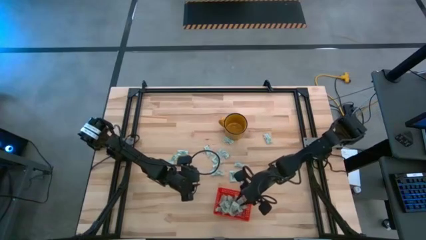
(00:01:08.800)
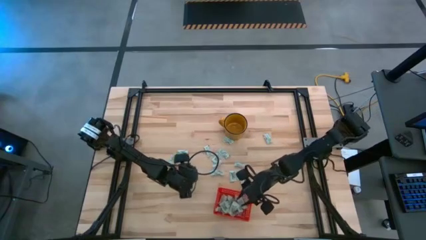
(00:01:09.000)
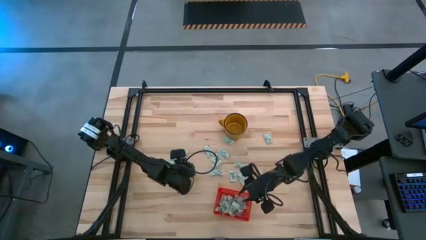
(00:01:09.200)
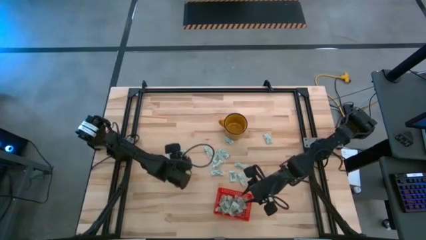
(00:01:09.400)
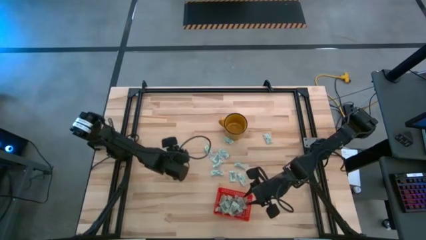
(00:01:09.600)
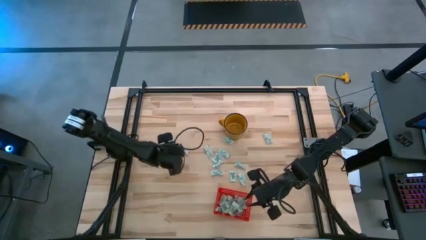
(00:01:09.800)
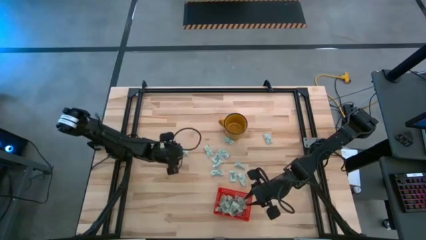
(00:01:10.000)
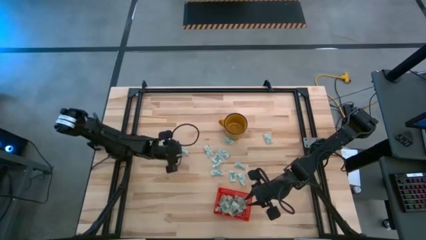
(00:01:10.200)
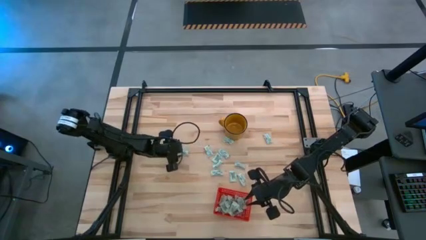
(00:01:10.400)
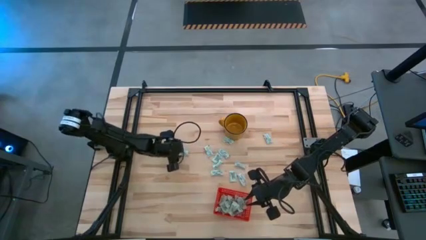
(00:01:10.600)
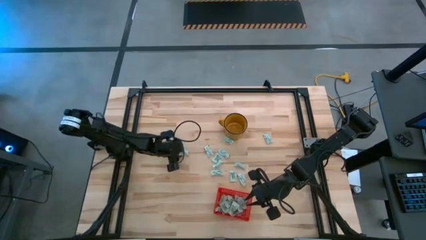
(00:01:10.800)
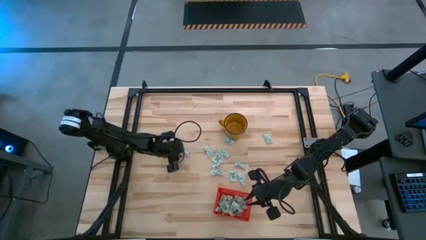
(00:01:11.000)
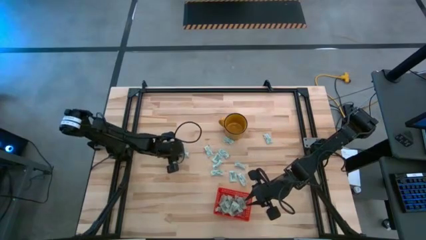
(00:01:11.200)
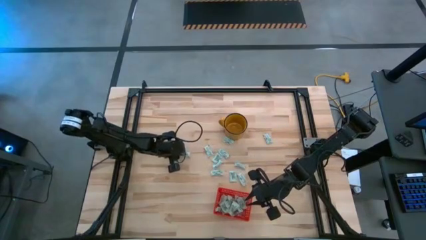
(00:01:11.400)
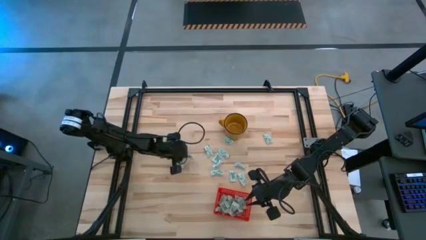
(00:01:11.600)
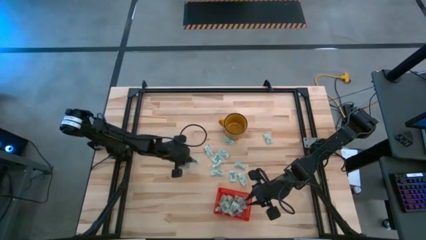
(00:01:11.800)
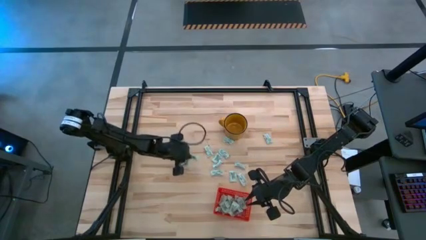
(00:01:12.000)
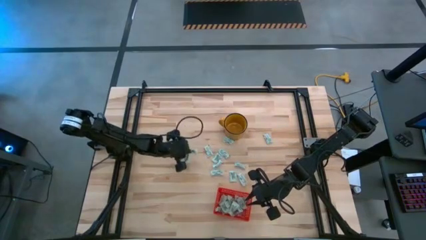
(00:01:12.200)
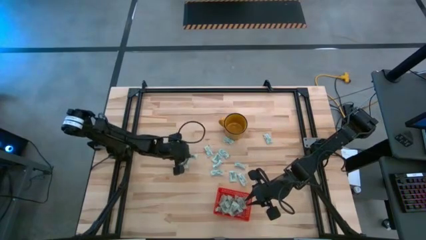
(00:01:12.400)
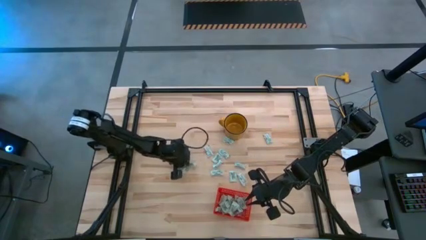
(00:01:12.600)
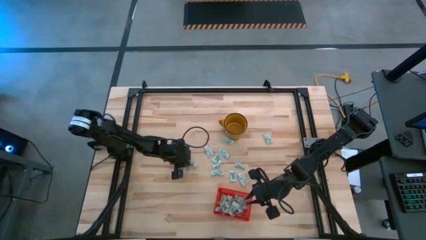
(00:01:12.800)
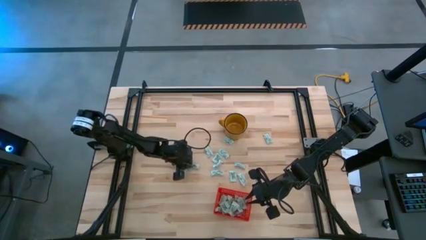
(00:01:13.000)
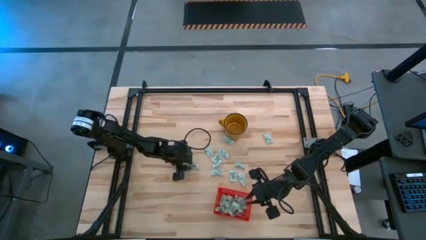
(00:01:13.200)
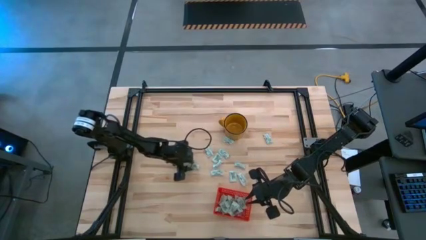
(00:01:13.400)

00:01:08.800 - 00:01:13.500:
Task: Pick and place Stevia / Truvia into bins
Put the stevia packet into the bin

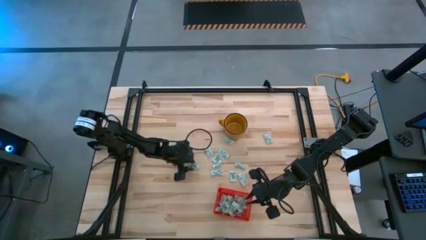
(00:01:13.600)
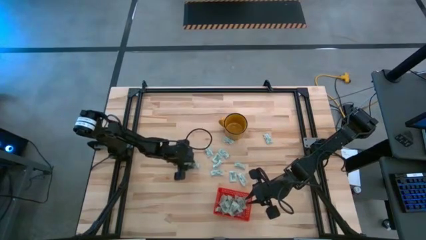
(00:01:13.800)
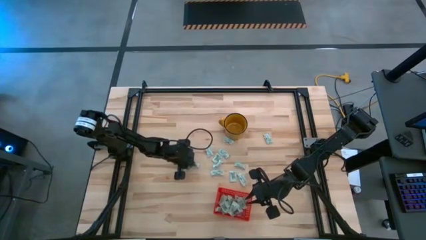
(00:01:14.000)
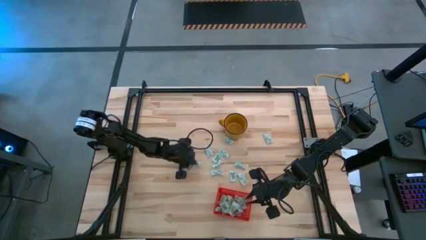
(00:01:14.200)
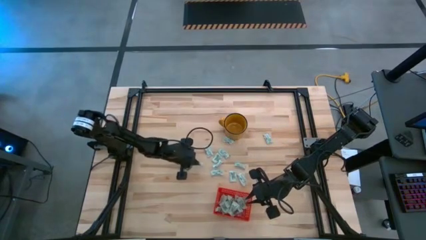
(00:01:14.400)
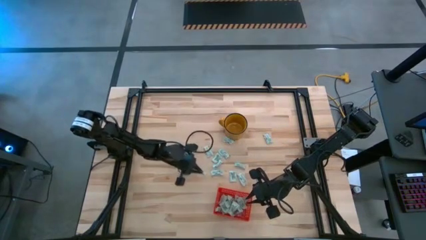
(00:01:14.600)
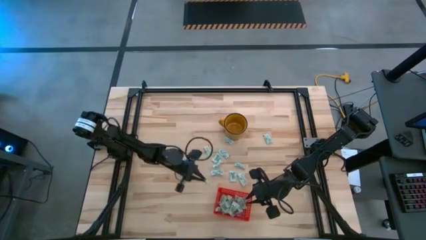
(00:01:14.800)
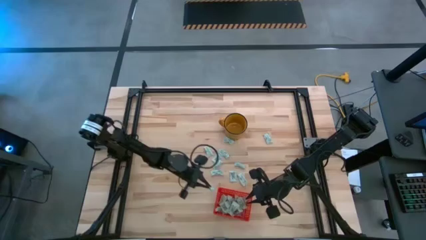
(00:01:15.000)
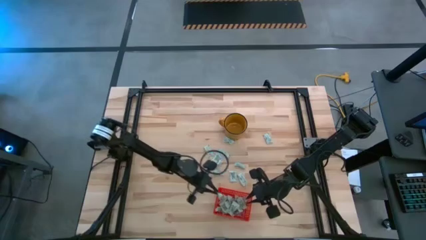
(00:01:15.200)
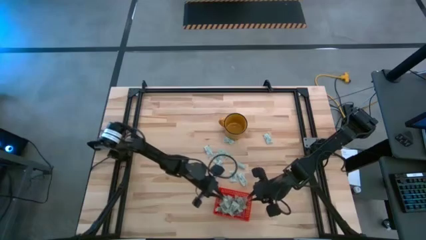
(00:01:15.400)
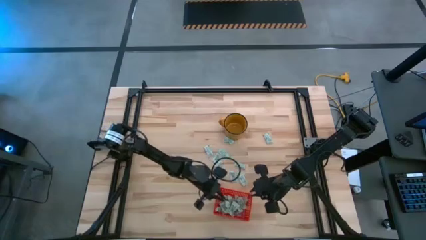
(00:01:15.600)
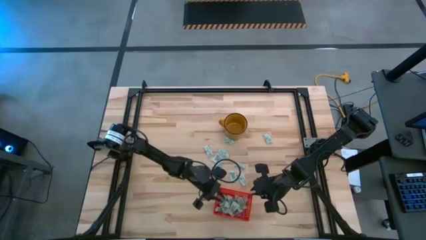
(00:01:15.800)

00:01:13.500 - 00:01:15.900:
Put the stevia packet into the bin

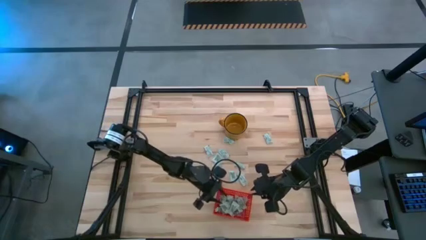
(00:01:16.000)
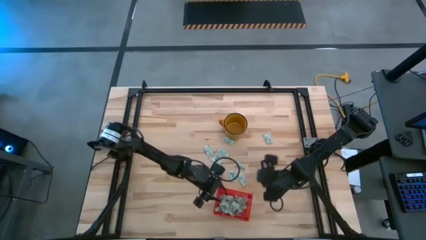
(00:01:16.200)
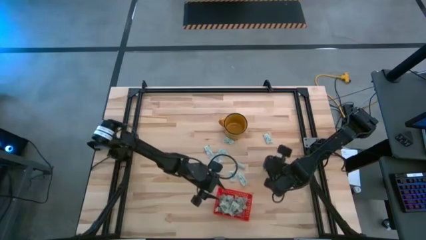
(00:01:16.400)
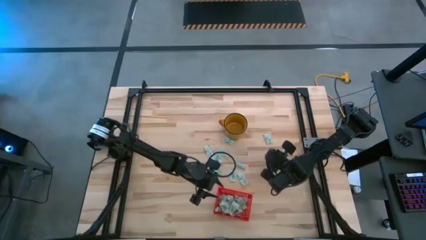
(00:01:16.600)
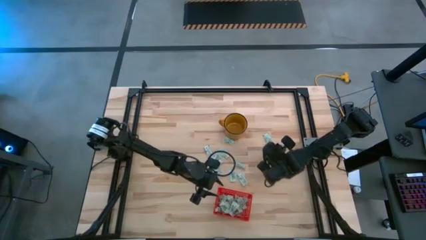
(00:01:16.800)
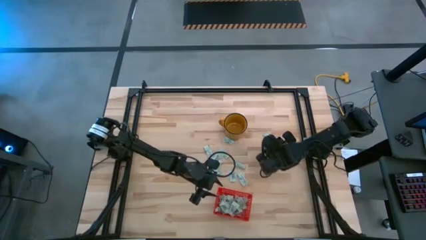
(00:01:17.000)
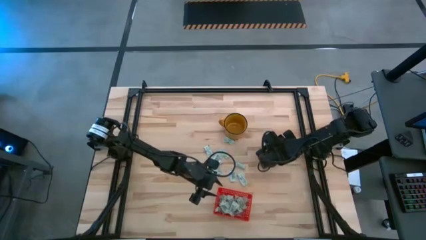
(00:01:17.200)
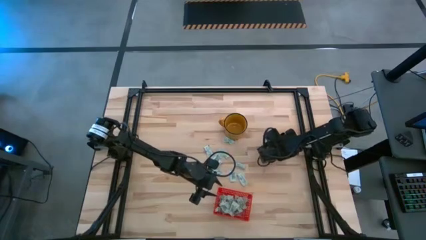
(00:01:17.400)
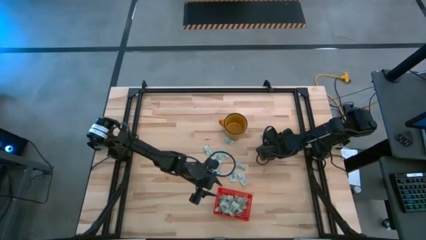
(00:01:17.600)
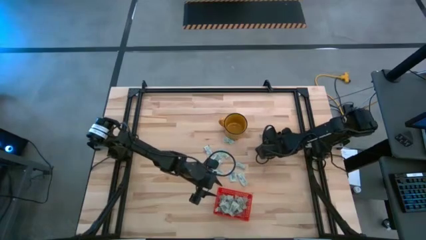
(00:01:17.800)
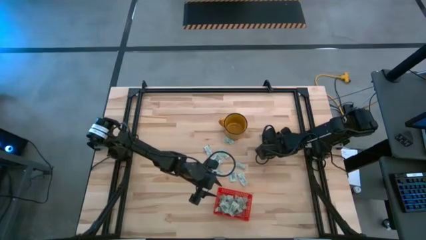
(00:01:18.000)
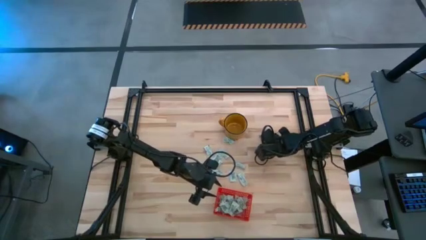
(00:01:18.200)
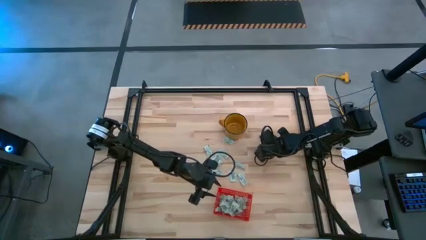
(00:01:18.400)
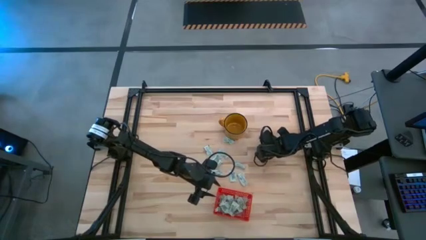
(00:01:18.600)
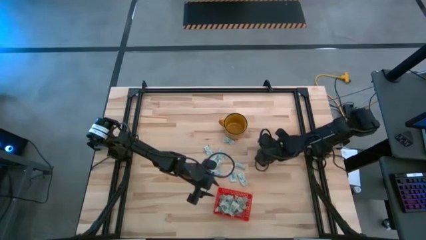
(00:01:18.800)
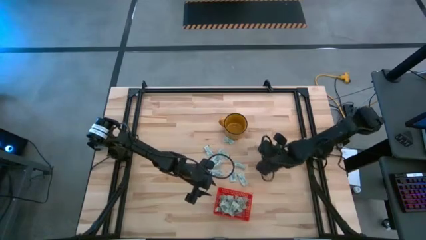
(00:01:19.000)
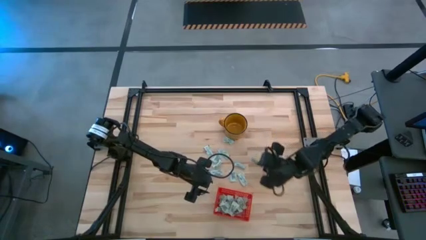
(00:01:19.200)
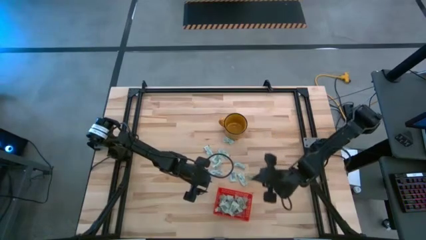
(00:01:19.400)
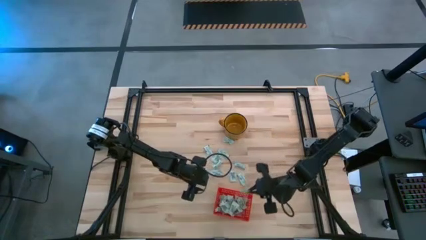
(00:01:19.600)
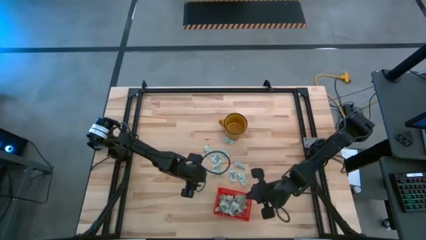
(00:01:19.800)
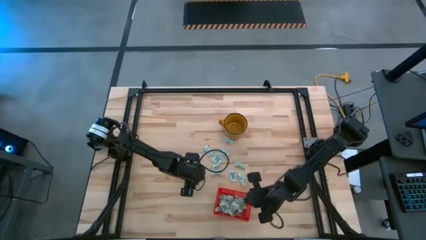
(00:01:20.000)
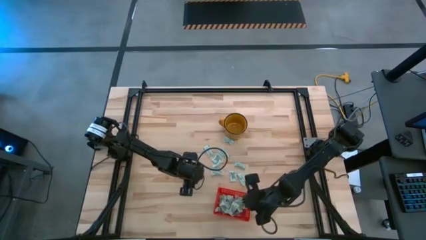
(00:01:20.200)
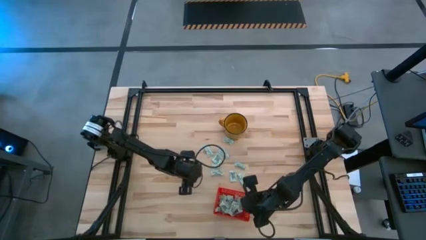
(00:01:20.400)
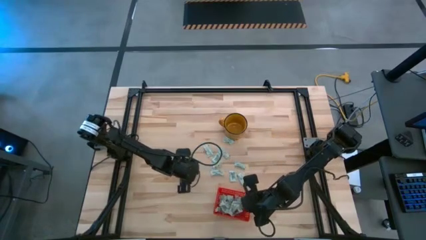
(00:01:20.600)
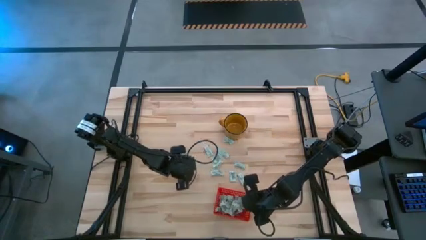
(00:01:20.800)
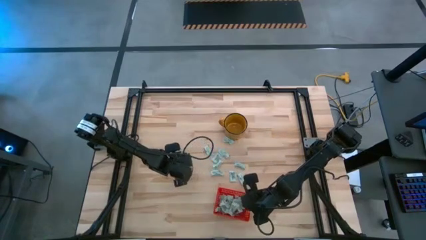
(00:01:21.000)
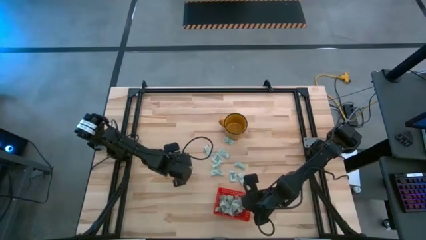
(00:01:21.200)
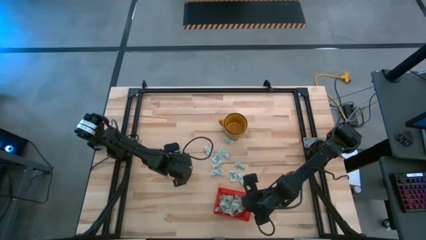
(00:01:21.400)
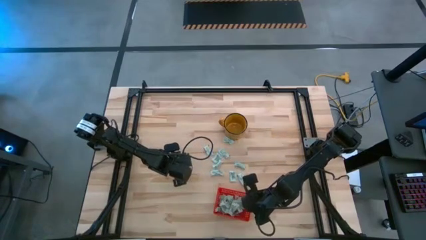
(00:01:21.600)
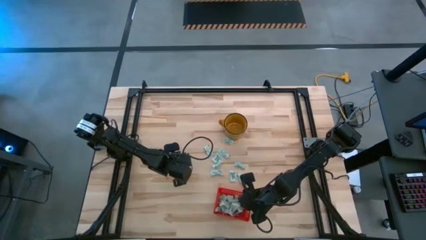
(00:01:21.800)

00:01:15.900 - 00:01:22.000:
Put the stevia packet into the bin

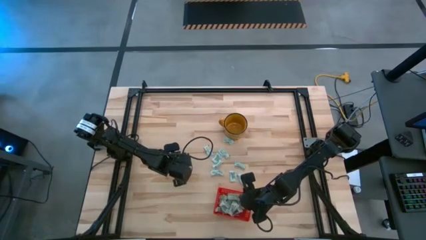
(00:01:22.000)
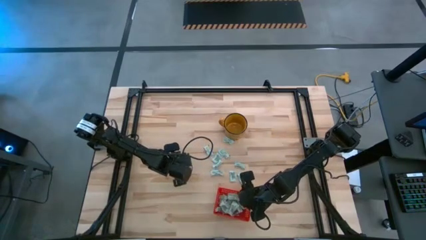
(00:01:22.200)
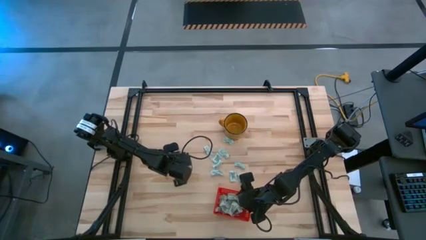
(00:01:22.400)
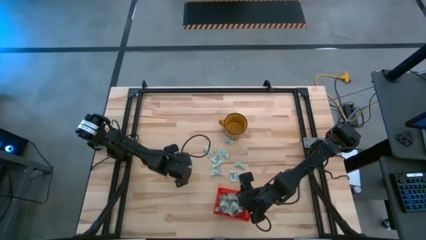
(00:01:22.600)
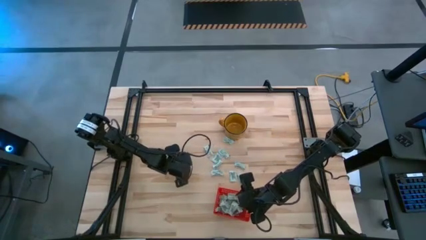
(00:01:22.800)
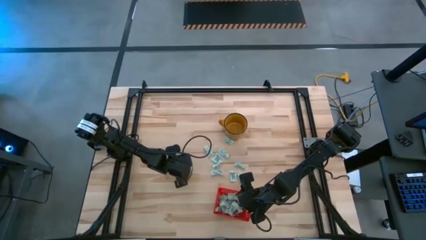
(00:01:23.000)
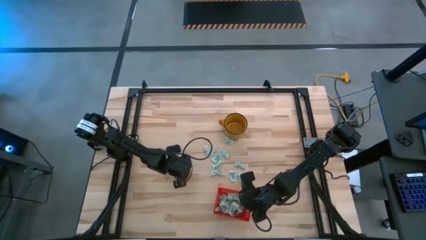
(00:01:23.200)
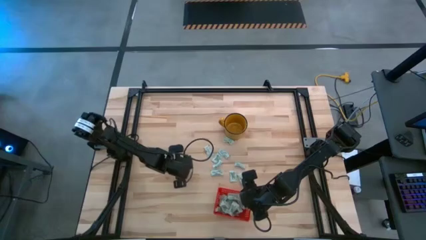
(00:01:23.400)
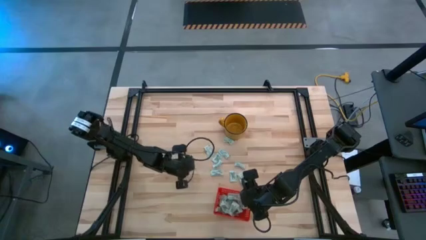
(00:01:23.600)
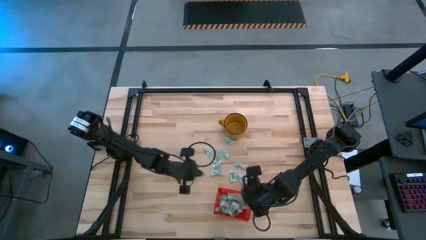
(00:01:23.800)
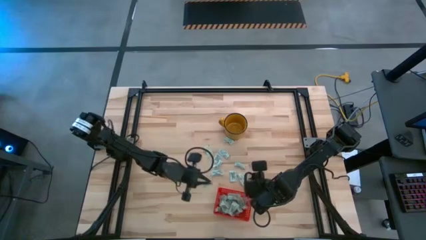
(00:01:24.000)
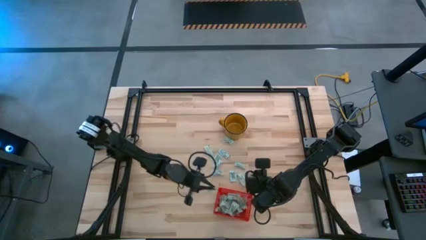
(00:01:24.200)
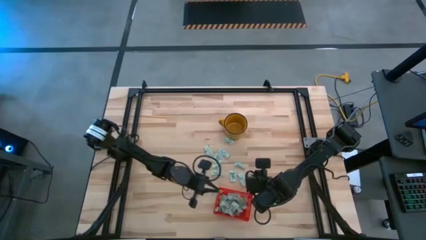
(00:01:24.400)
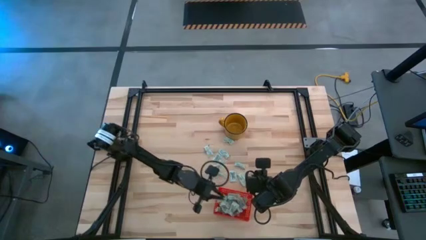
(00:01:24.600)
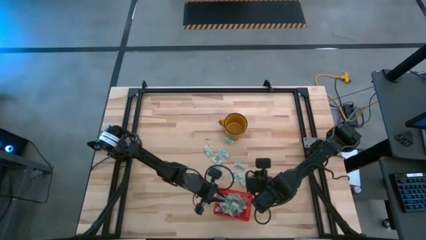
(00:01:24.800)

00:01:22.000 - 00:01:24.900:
Put the stevia packet into the bin
